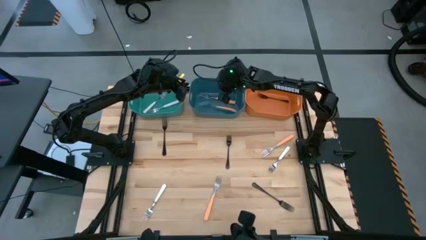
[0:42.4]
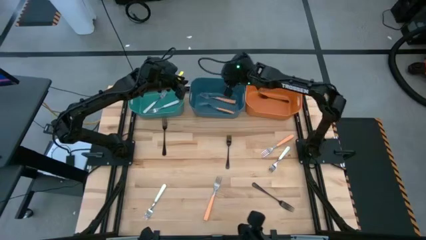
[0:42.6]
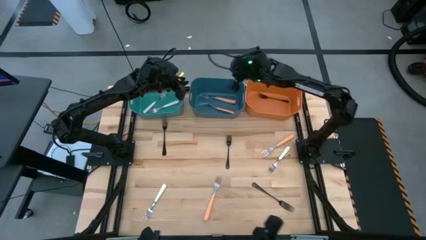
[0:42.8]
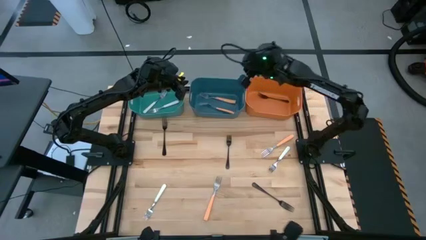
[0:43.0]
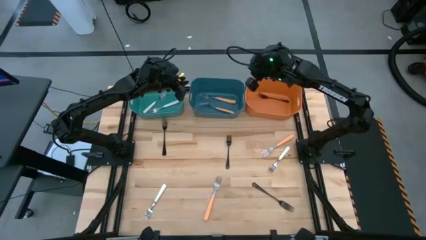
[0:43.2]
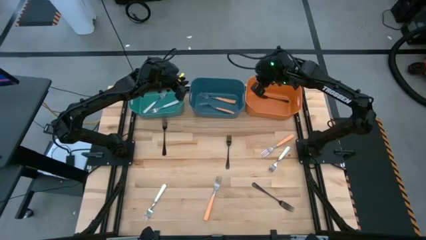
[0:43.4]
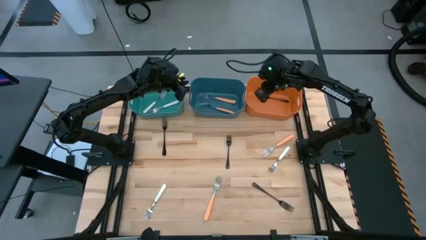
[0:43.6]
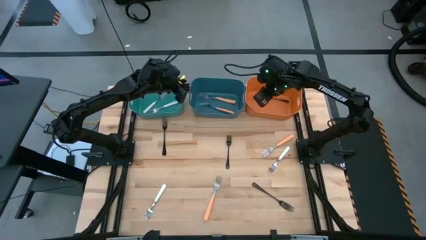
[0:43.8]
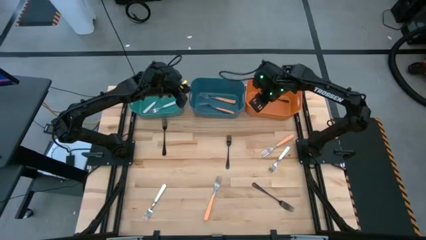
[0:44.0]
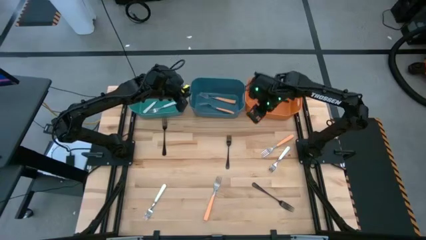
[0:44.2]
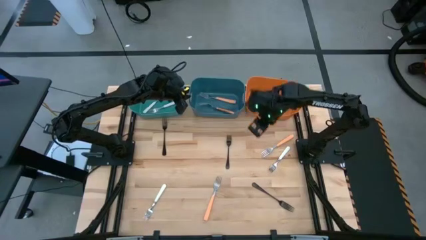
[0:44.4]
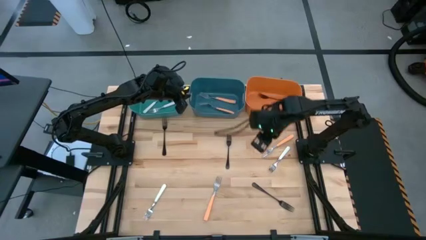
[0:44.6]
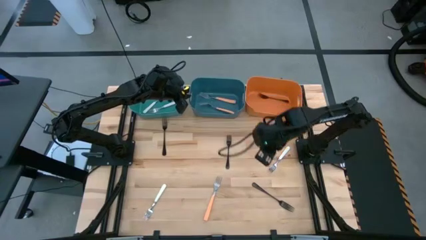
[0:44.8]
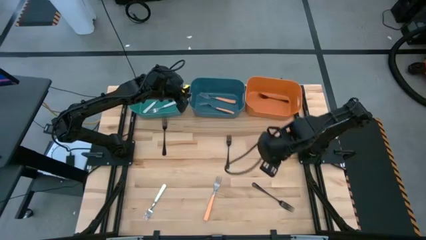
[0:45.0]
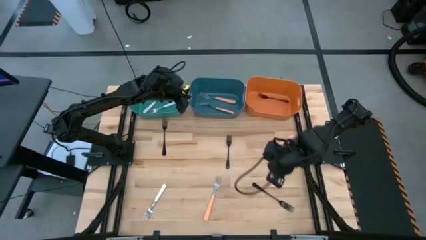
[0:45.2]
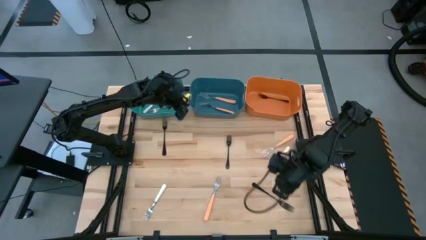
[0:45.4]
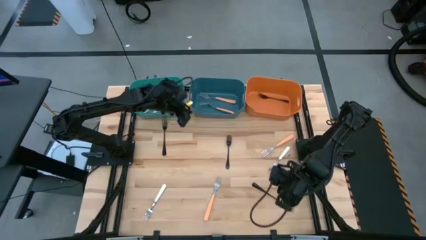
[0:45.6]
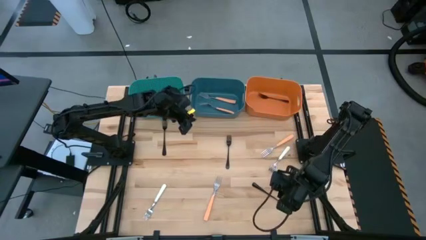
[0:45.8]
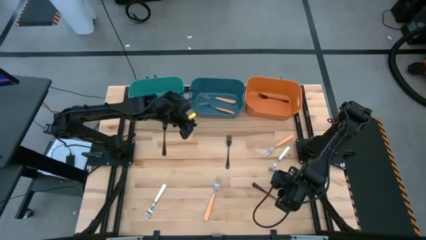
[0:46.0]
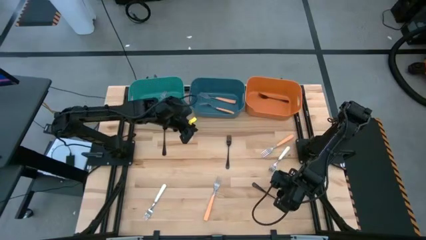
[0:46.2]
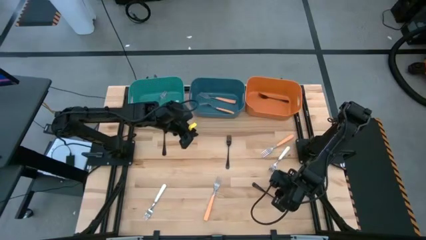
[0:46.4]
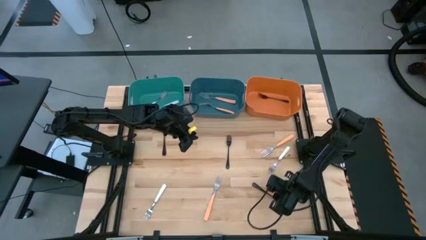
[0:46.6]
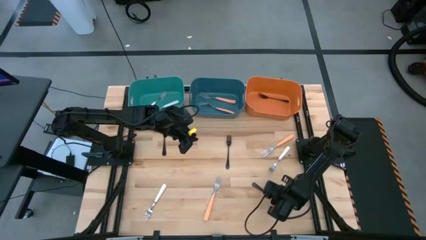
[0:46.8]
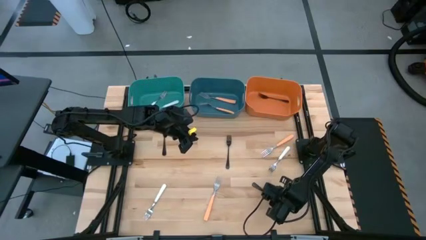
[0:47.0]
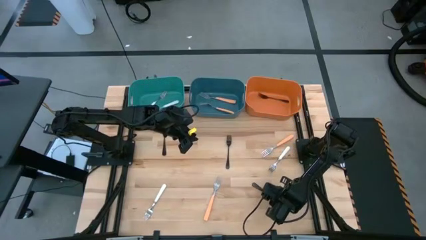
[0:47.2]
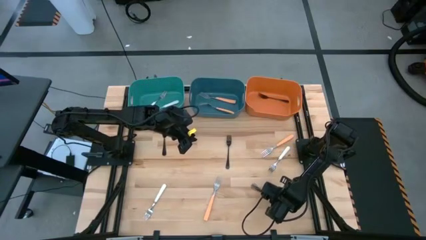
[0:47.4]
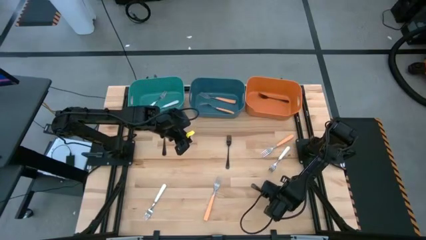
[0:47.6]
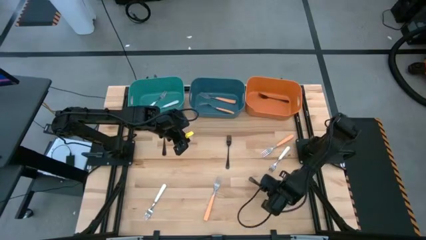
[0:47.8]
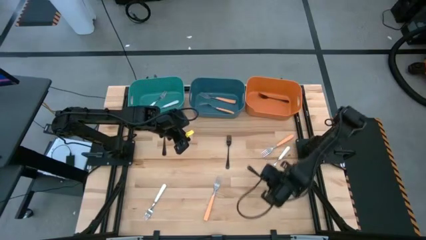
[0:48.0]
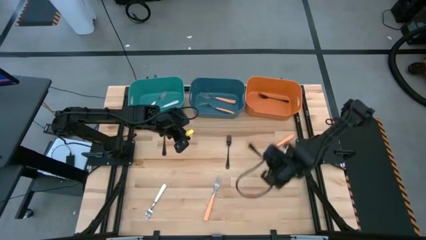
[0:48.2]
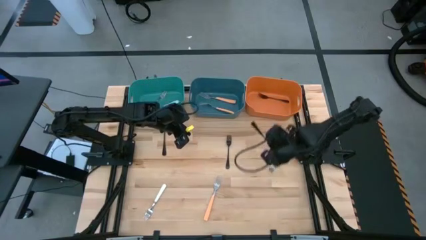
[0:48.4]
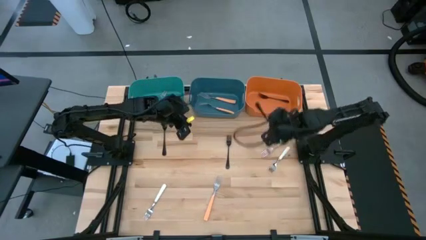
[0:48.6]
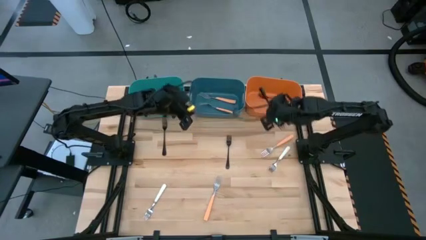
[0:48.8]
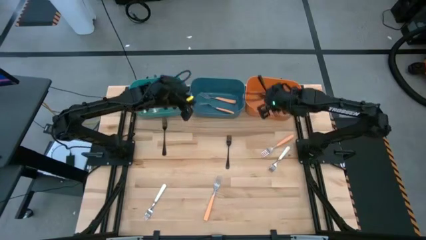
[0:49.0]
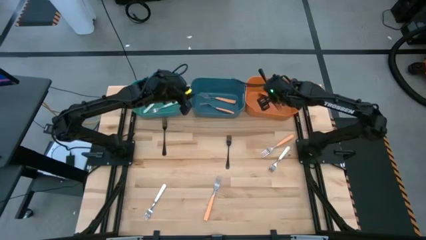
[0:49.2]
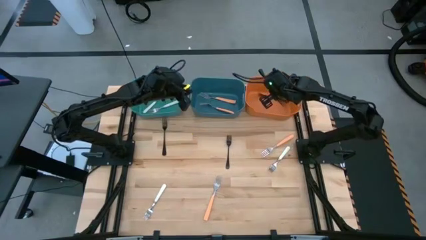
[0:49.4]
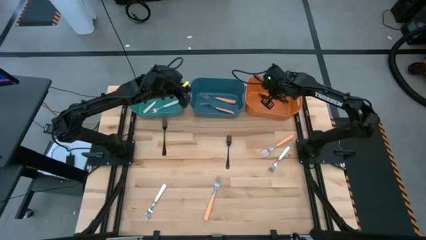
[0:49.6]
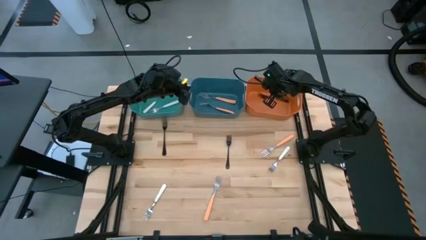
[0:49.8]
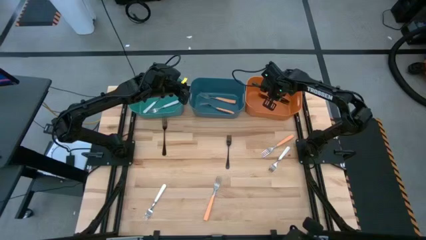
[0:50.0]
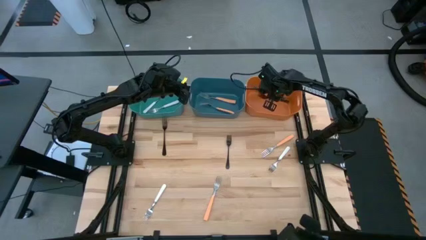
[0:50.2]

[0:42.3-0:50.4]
Task: Sort silverware by color (type)
Put the bottom right black fork into the orange bin

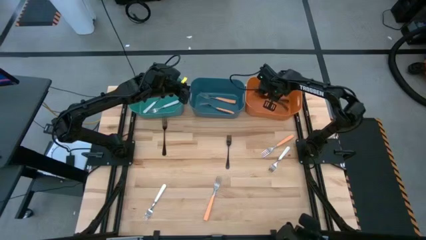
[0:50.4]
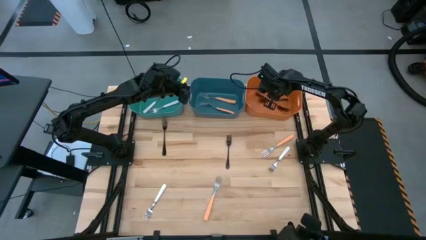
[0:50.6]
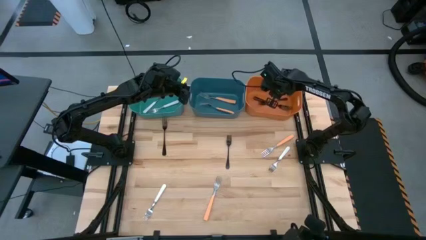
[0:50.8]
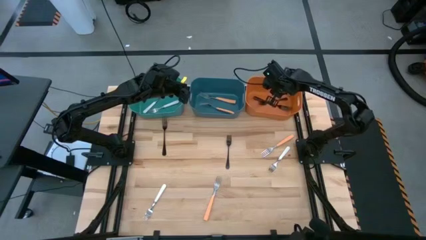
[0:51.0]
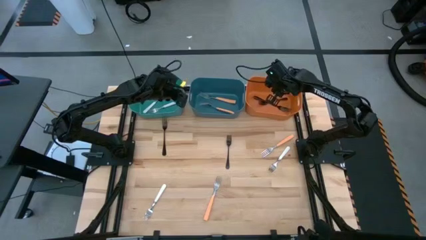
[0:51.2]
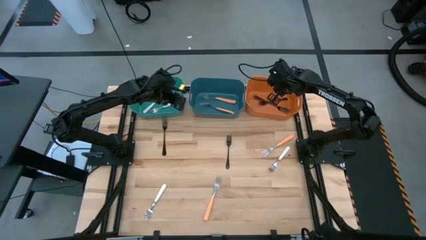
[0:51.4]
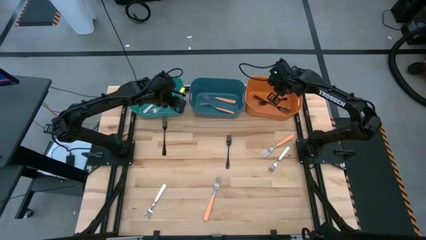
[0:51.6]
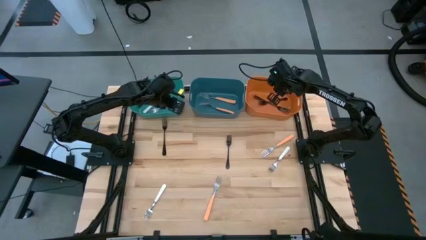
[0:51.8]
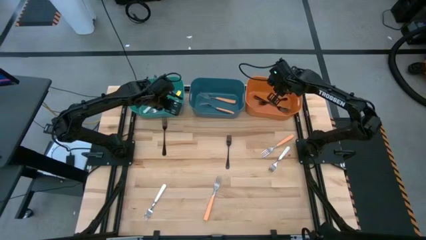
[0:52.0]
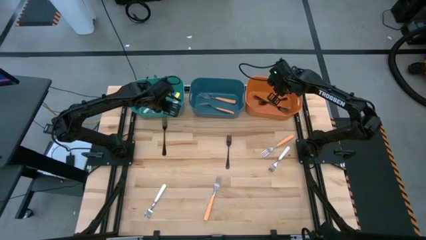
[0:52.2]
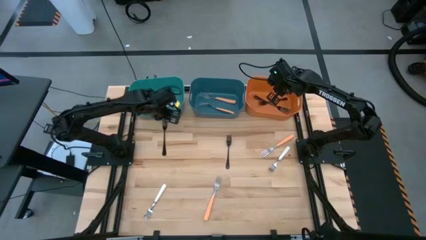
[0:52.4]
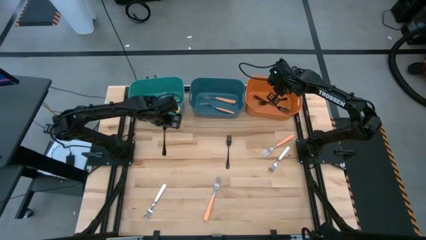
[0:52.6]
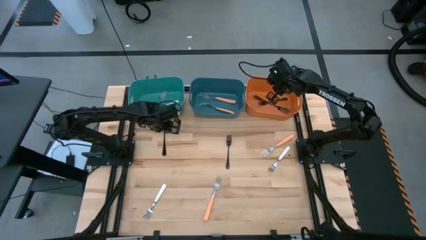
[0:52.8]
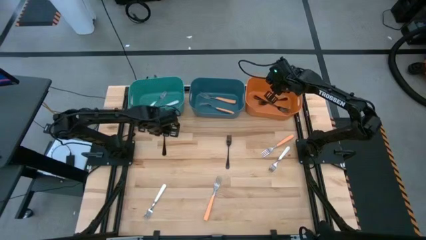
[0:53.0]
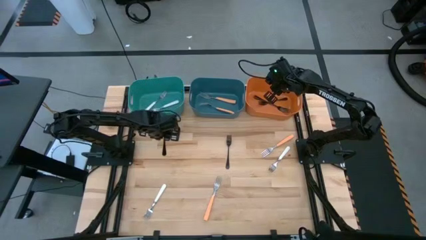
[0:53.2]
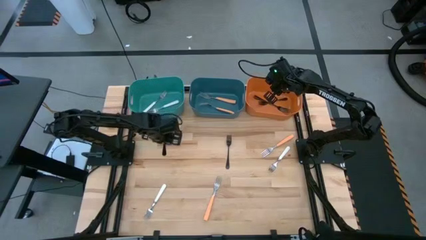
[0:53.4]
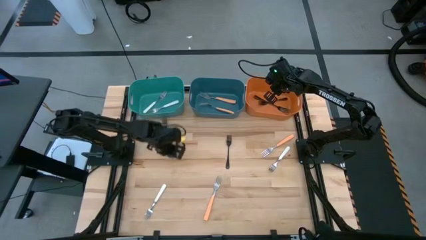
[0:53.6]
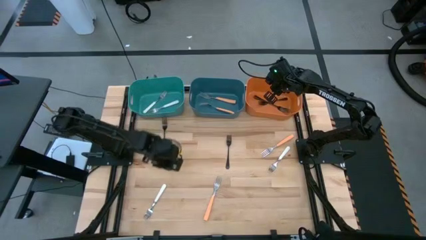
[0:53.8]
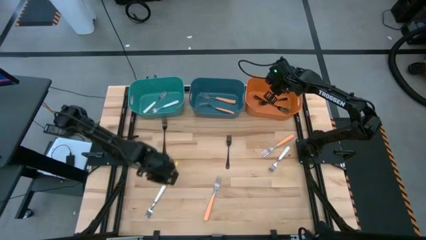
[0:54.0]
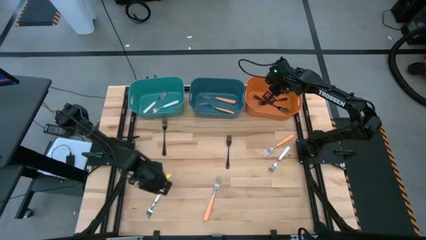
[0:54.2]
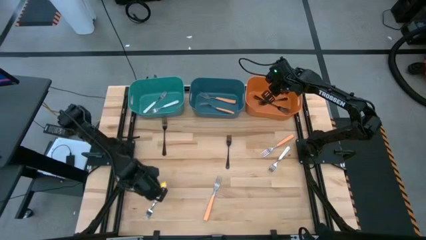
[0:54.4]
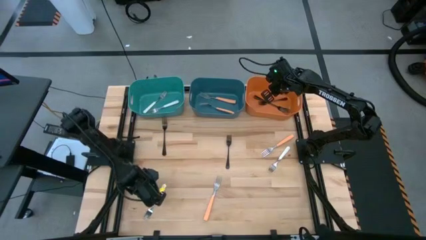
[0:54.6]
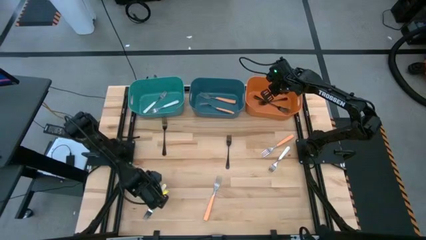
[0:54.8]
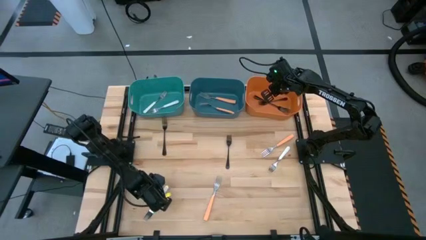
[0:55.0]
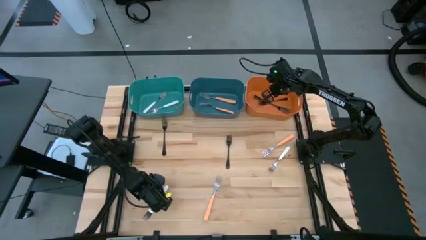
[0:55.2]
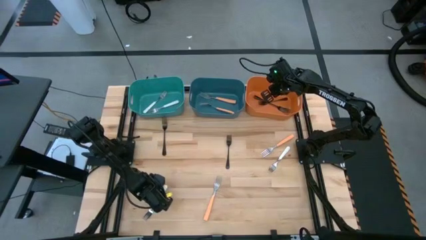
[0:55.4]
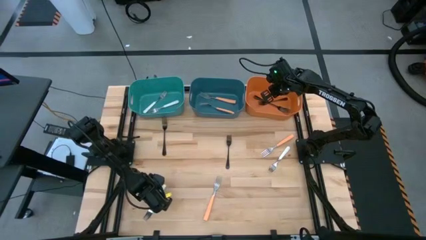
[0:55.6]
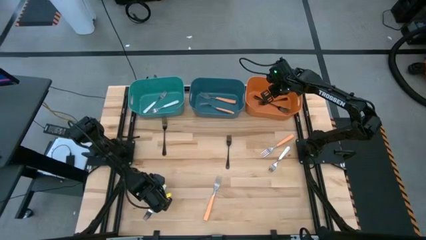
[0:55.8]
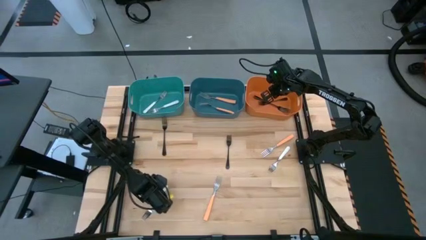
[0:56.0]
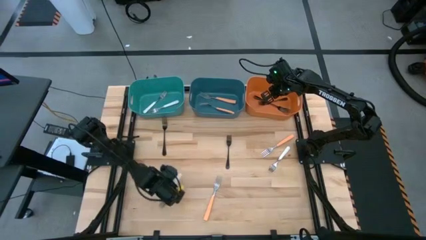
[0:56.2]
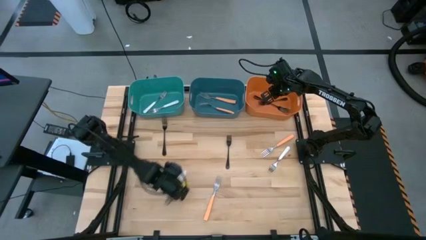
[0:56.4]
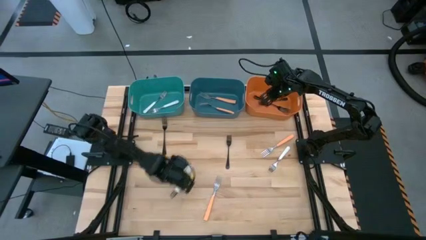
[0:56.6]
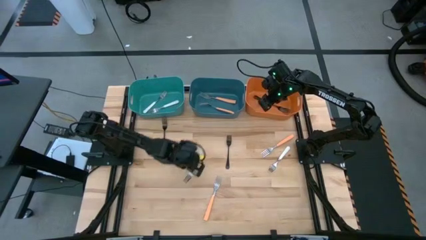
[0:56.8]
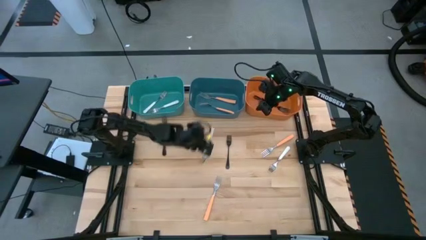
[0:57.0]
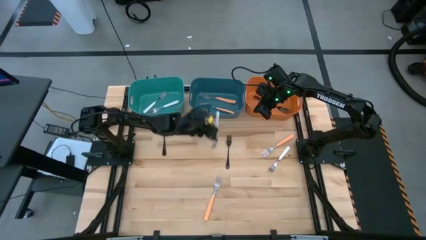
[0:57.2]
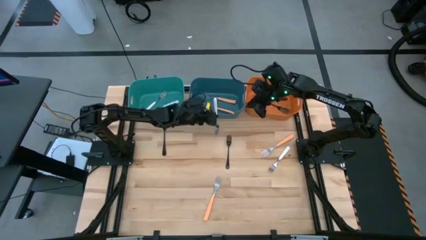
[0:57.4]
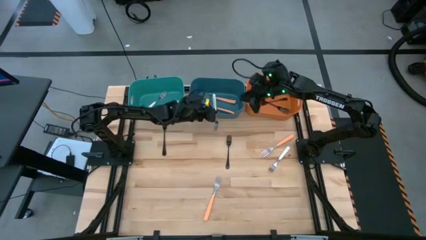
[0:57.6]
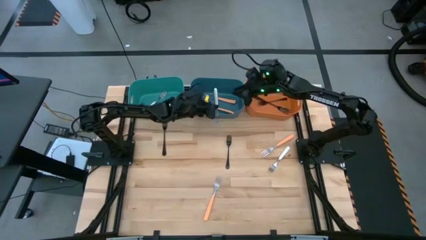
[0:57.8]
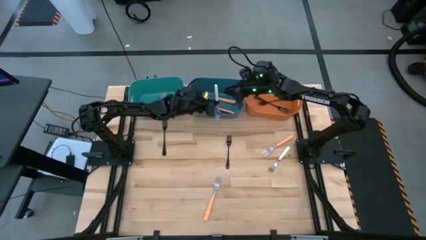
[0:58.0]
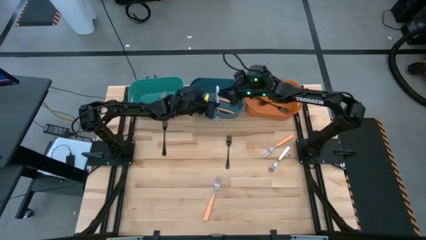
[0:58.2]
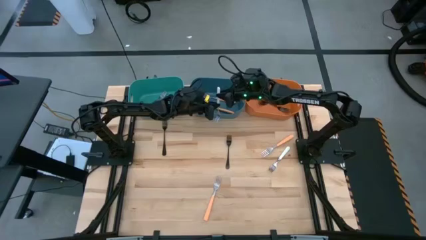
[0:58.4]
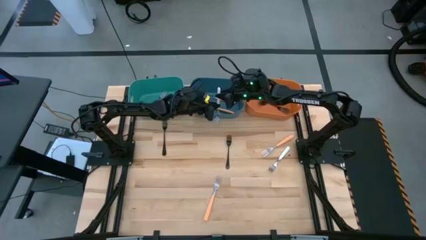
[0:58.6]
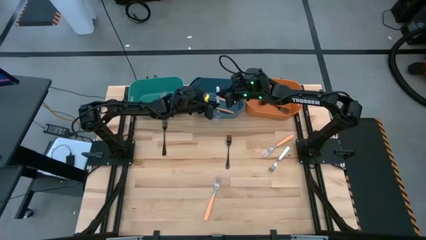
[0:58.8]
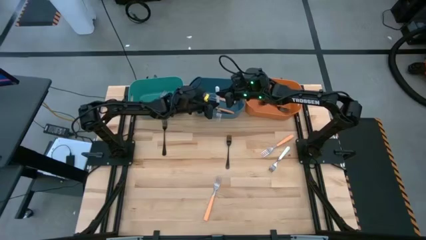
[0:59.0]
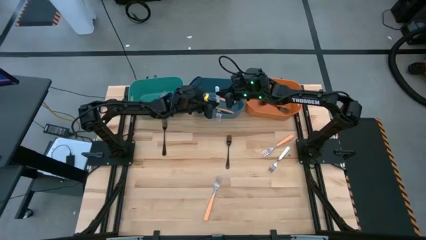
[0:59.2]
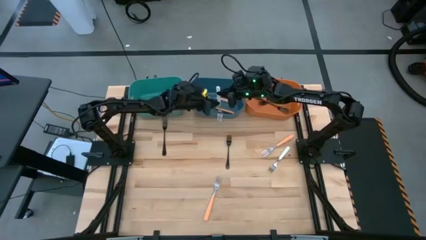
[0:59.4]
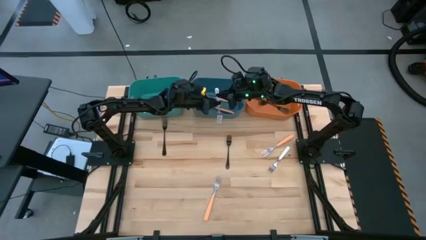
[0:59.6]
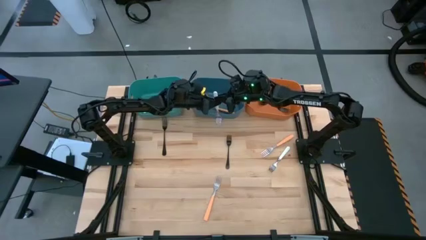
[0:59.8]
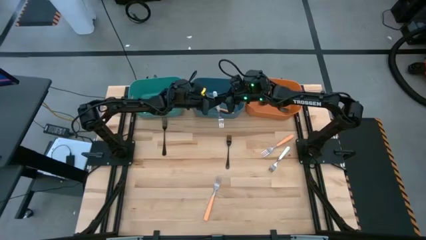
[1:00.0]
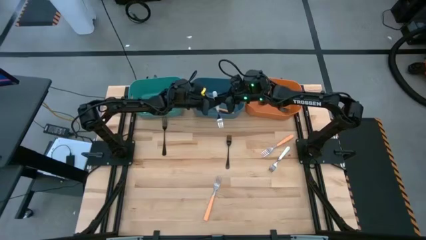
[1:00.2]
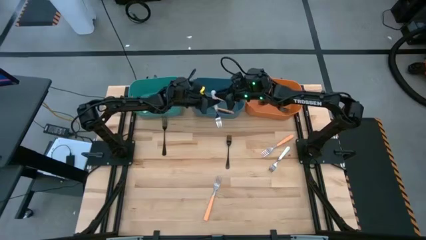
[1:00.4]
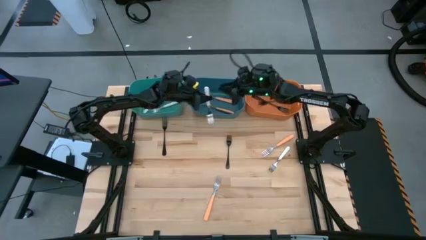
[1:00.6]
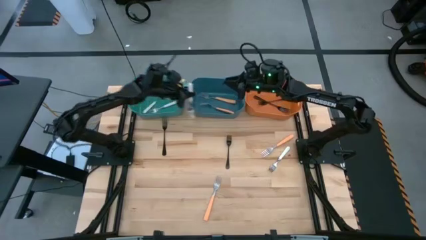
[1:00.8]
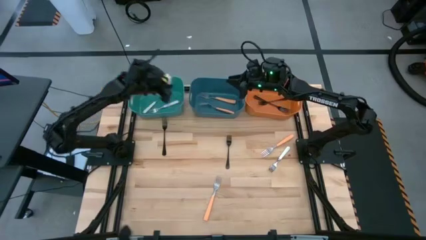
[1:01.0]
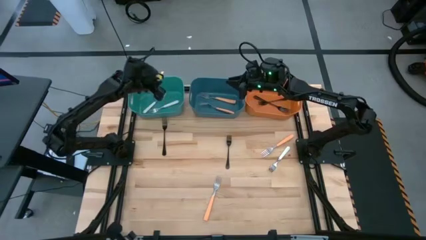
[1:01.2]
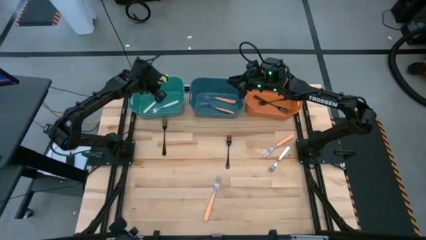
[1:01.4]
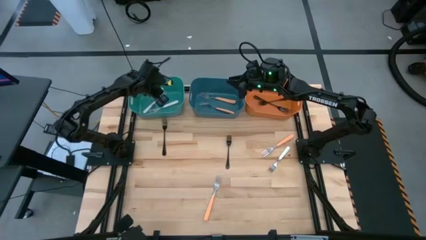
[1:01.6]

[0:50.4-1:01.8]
Put the left white fork into the light green bin
